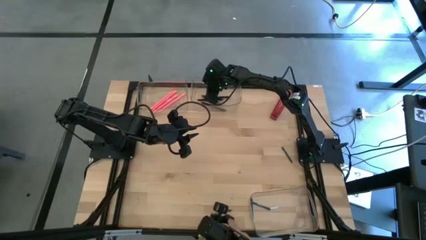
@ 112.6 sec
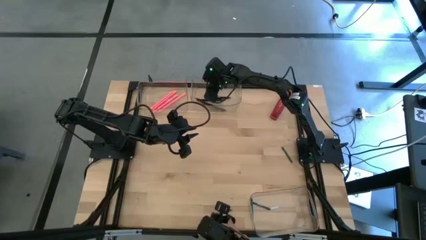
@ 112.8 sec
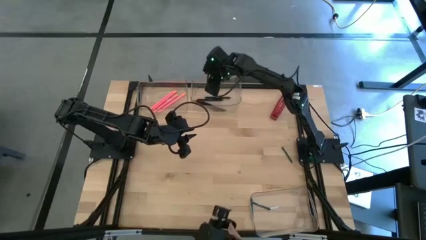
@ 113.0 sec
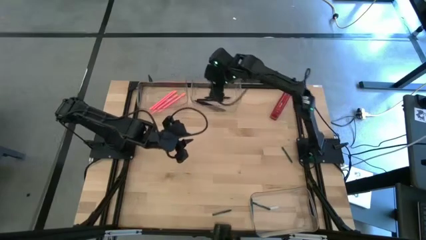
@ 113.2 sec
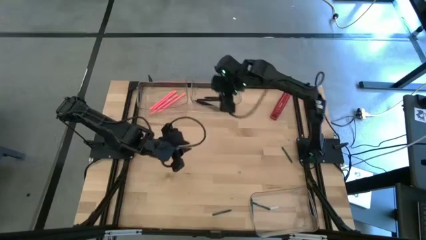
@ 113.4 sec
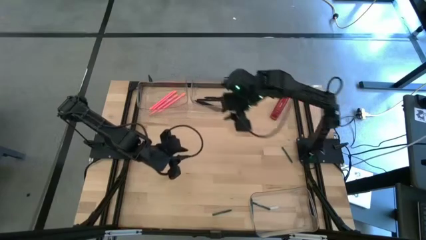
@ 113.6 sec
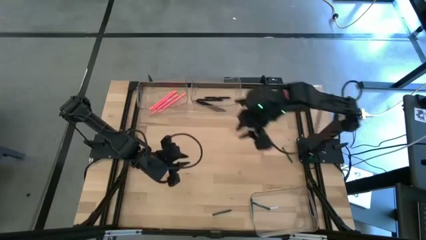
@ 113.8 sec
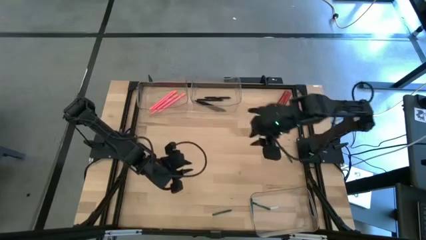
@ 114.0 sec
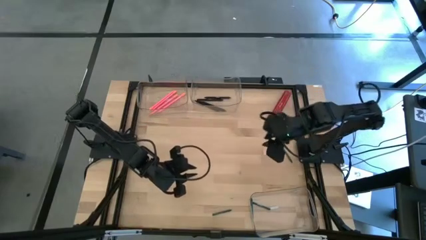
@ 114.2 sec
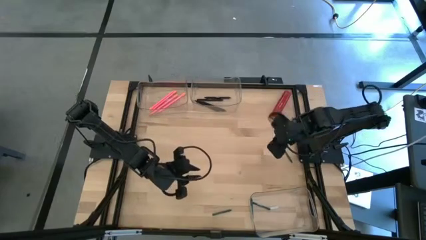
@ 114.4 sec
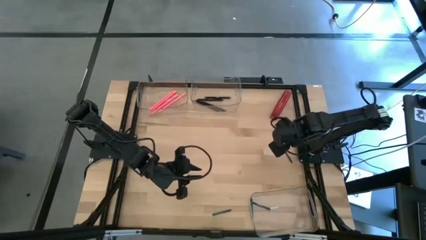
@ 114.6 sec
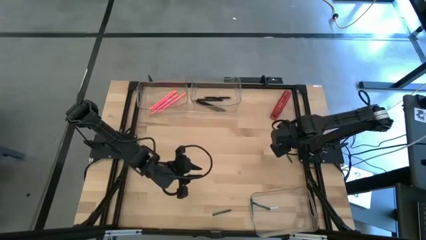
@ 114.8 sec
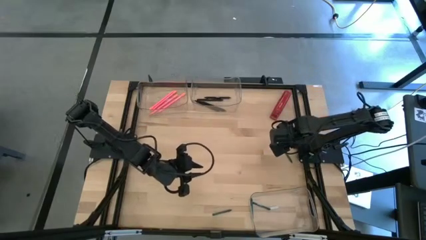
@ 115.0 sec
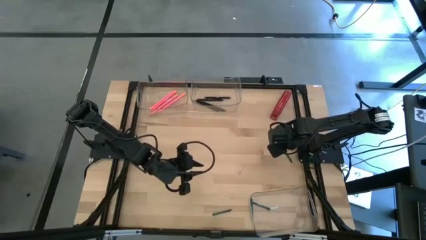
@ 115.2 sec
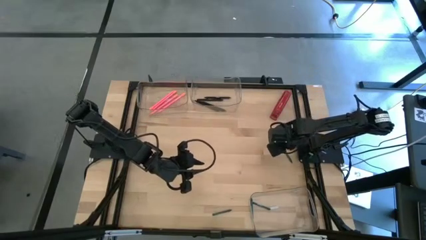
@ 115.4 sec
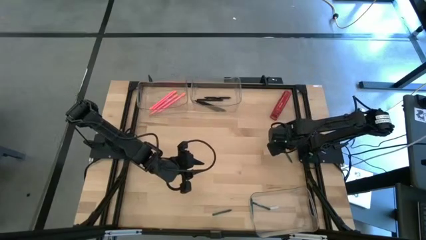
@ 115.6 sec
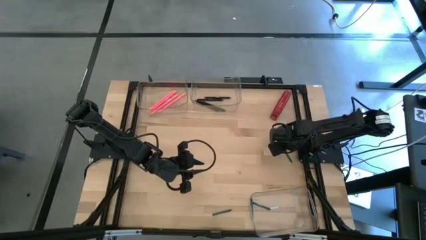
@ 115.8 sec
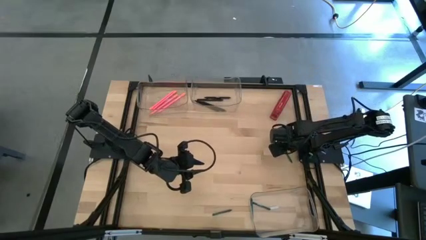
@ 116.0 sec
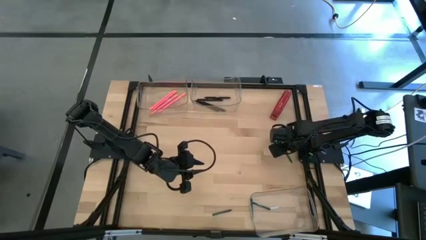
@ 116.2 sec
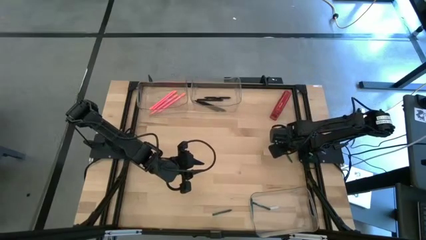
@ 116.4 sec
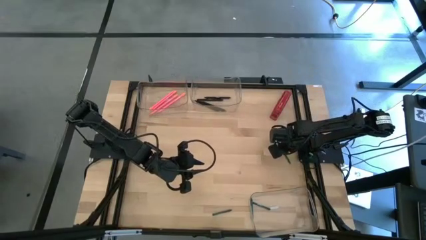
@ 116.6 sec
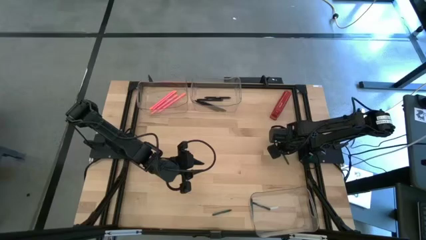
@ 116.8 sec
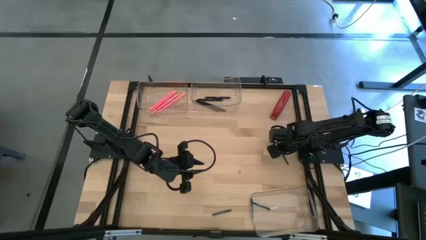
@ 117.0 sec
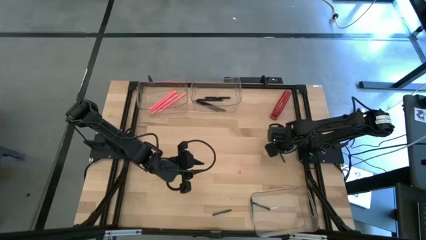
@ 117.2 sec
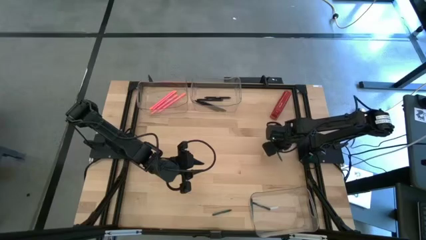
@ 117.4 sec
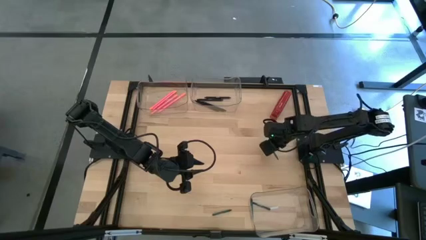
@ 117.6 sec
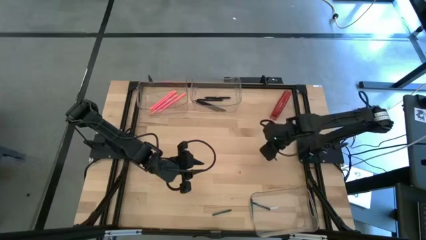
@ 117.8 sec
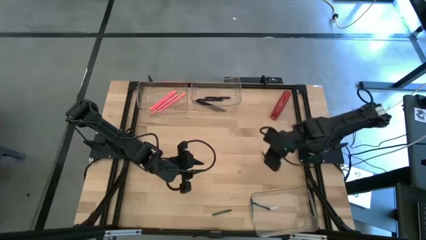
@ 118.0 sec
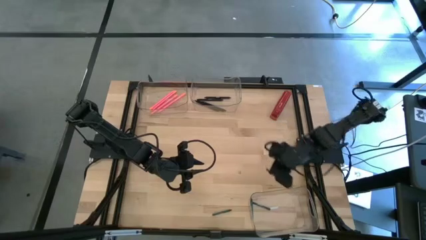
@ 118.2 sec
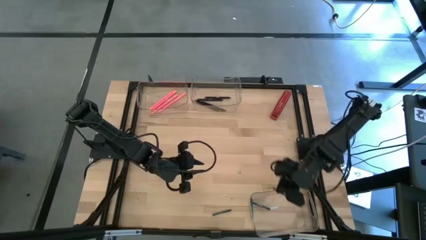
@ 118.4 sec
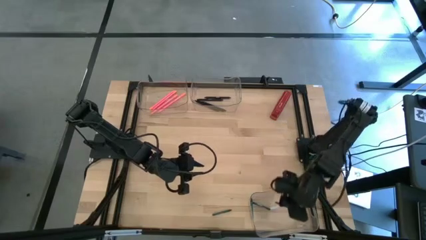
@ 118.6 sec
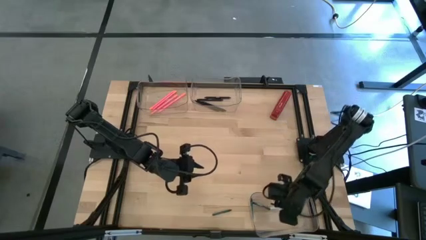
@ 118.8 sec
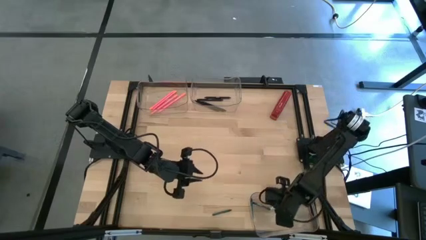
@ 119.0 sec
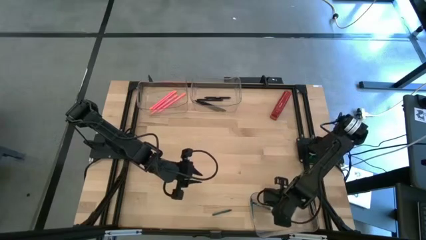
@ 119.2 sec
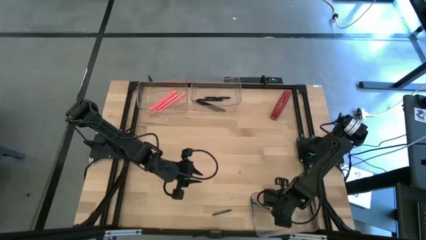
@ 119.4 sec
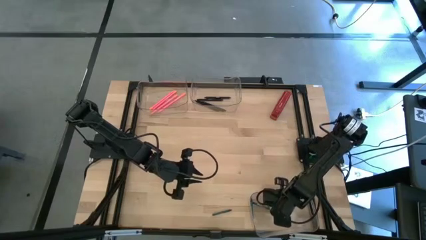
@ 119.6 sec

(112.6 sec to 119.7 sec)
Task: Sort crayons/erasers/pens/pencils in bins
Put the green crayon into the bottom transparent bin

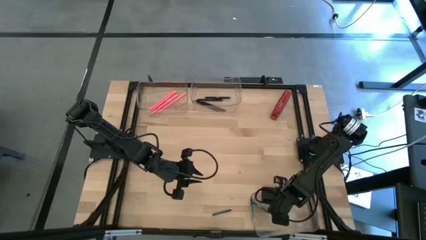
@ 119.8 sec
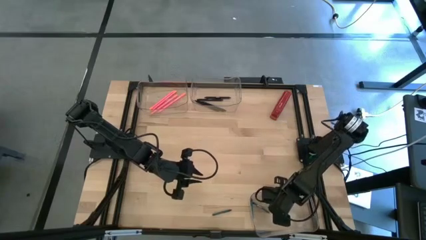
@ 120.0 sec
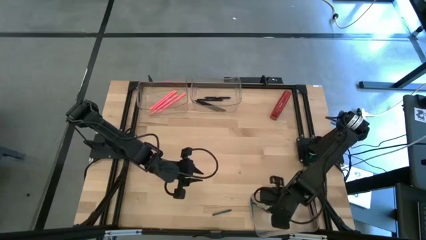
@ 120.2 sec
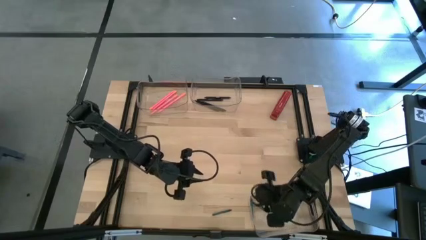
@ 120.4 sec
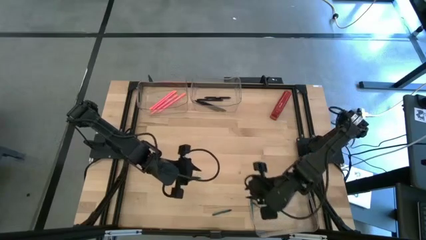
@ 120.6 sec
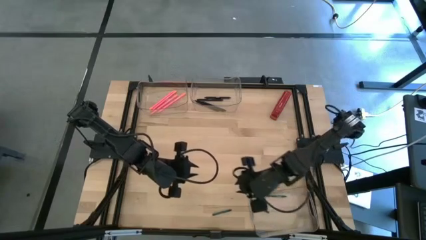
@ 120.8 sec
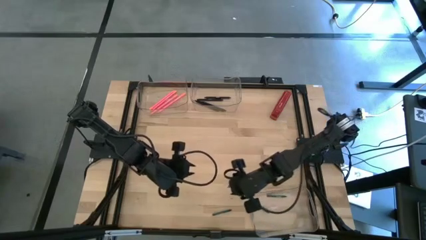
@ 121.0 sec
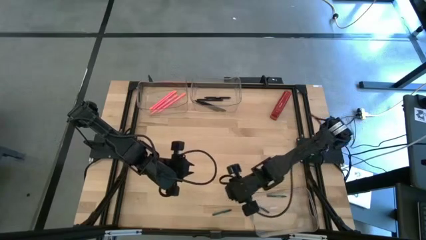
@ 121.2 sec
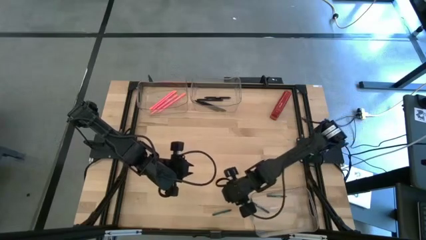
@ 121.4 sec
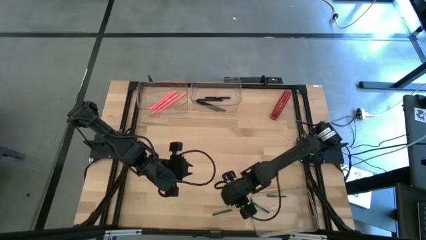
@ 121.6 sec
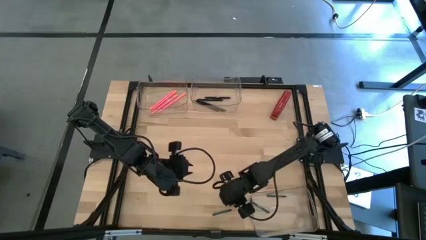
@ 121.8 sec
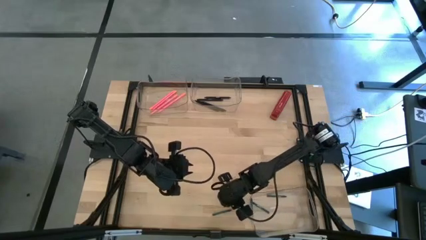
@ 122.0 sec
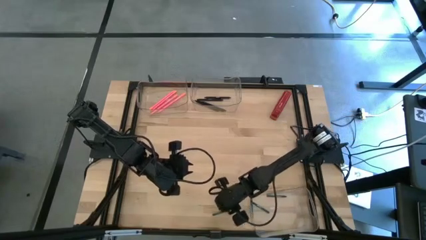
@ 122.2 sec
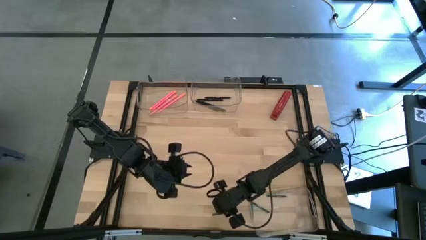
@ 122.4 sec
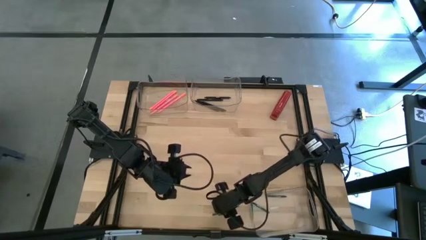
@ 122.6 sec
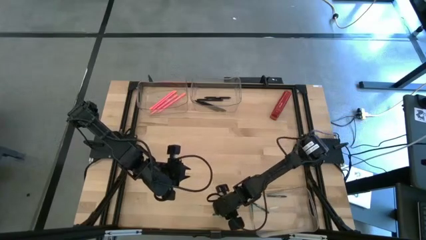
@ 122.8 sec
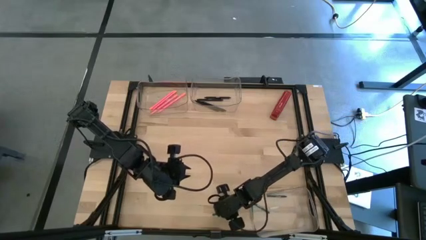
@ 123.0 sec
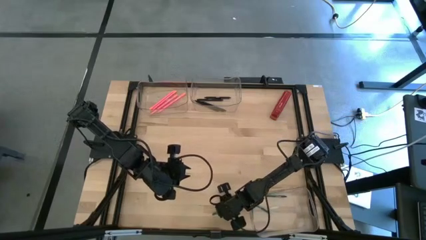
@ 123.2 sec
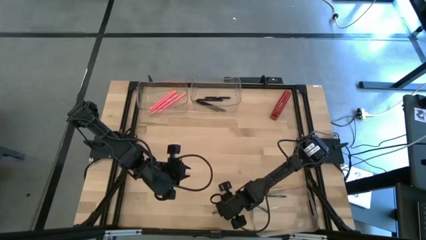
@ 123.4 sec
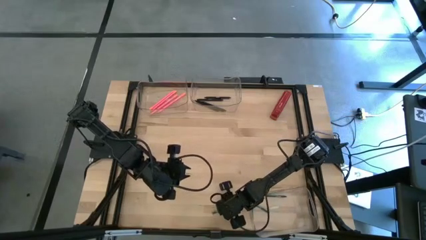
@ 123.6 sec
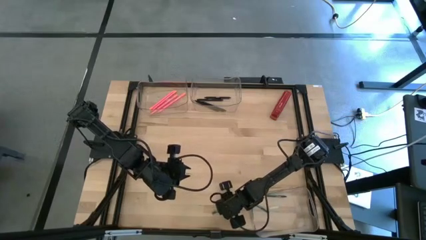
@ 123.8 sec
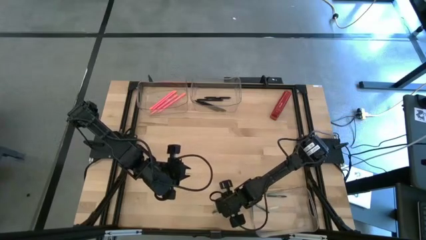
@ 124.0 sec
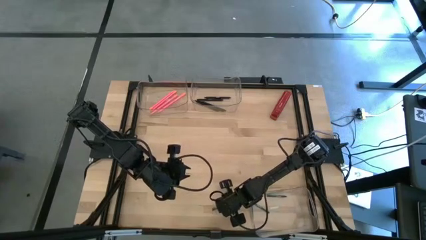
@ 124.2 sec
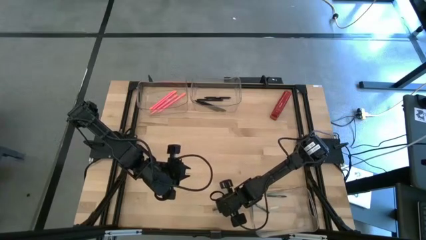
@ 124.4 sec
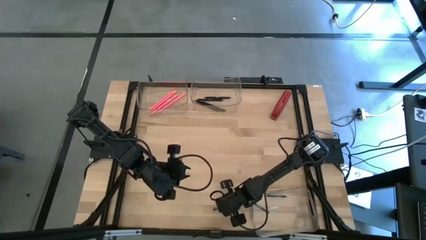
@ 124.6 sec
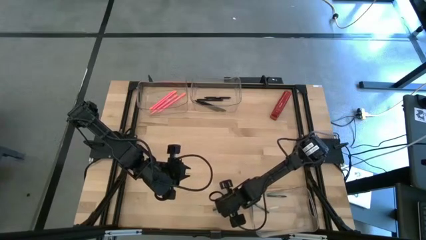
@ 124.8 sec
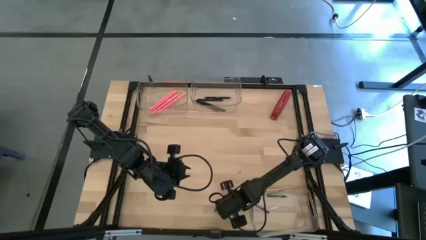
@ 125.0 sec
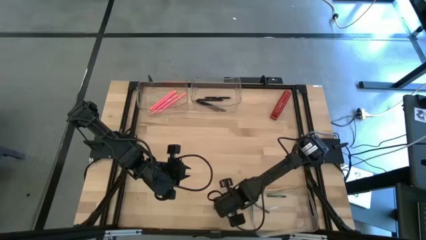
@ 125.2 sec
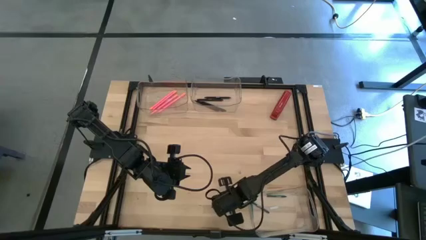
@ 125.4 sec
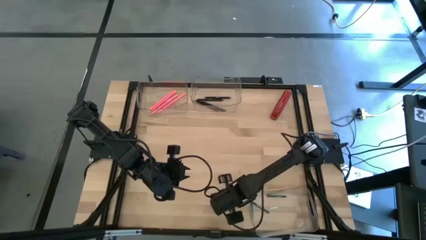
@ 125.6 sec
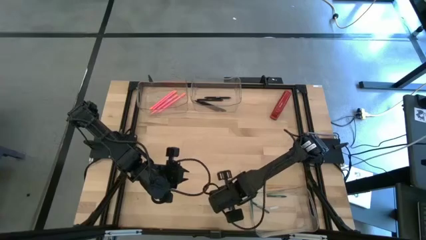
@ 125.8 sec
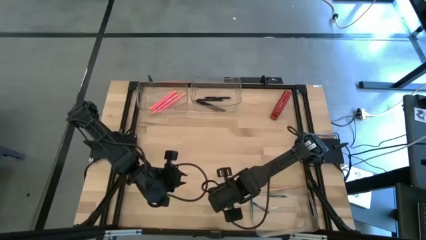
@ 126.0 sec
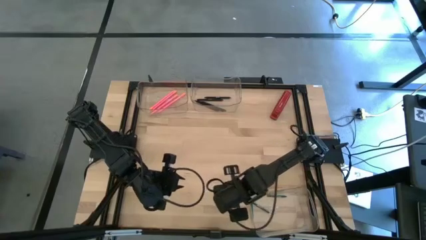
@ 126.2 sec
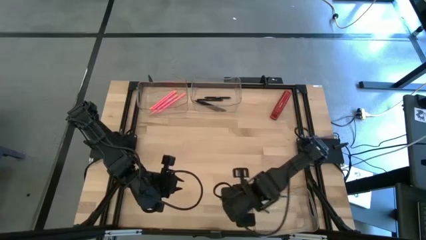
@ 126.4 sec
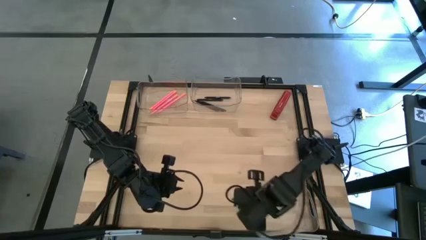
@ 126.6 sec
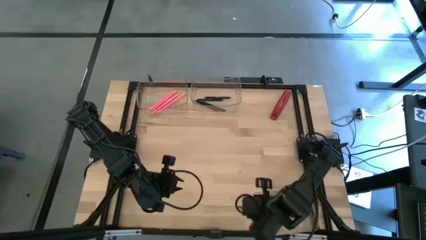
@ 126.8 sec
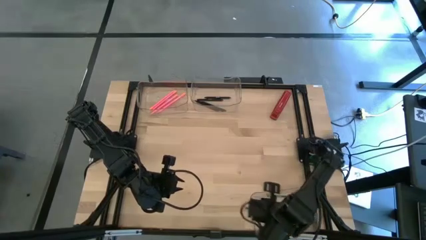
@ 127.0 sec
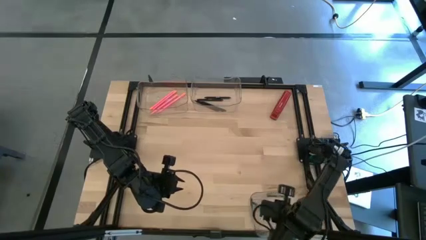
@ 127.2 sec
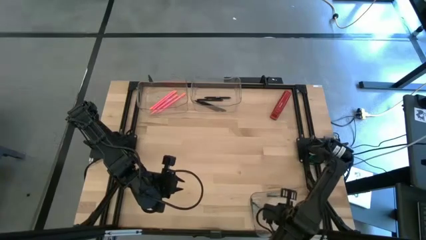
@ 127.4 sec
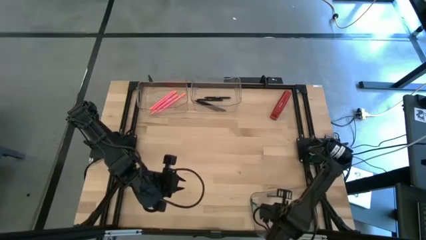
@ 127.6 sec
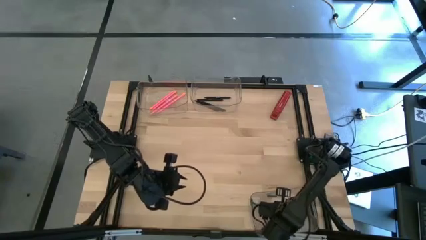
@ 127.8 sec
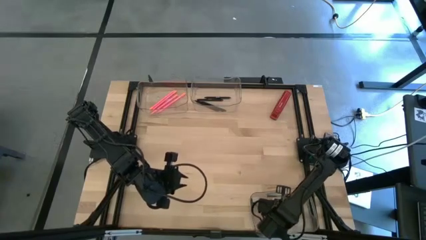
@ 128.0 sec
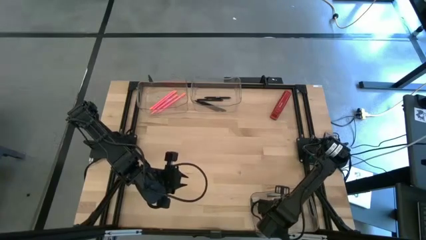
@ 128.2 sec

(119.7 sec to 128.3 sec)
Put the green crayon into the bottom transparent bin

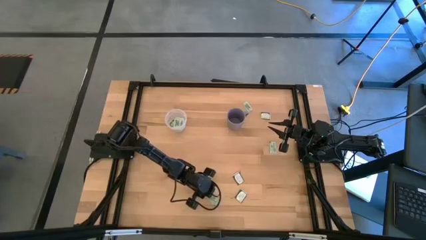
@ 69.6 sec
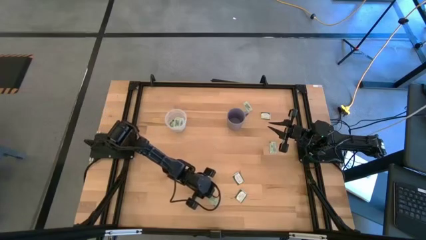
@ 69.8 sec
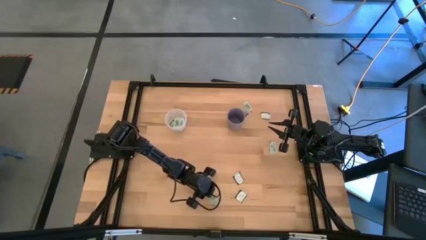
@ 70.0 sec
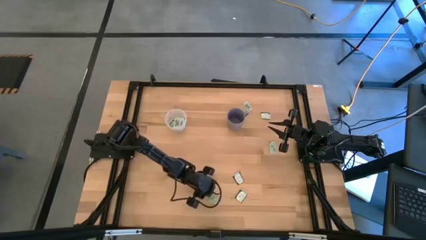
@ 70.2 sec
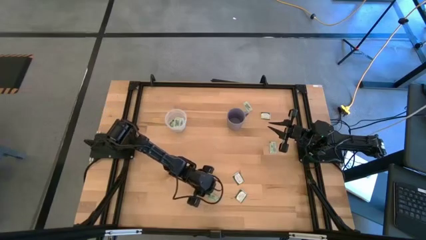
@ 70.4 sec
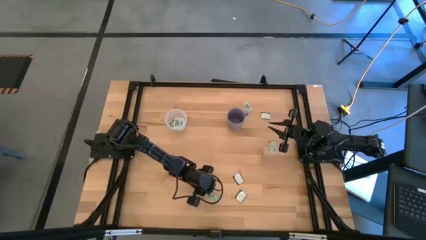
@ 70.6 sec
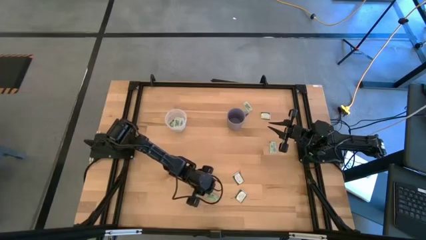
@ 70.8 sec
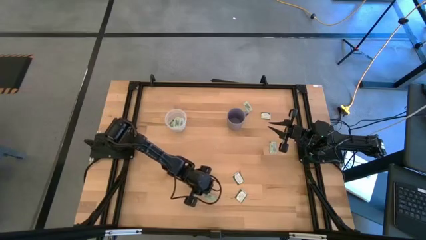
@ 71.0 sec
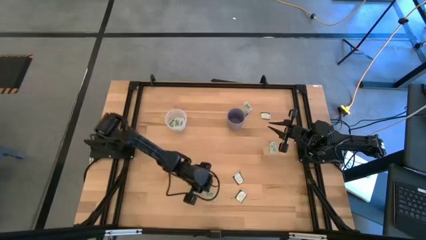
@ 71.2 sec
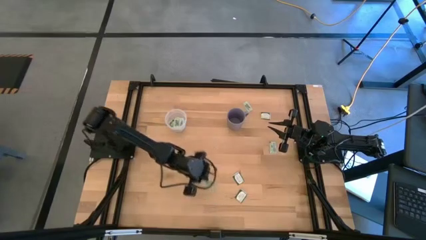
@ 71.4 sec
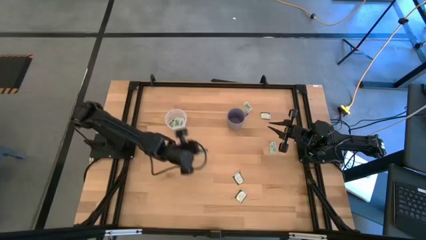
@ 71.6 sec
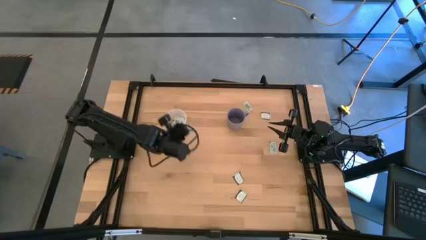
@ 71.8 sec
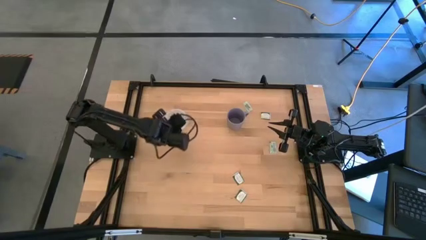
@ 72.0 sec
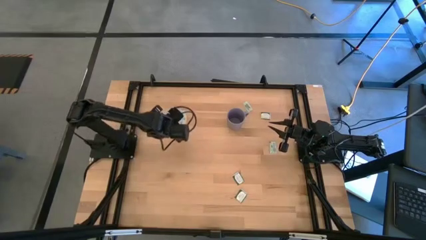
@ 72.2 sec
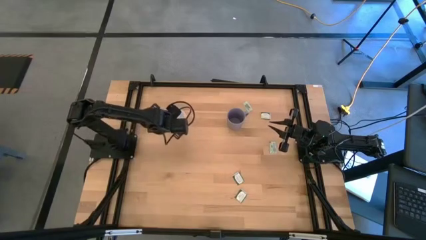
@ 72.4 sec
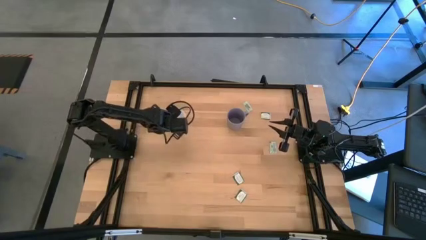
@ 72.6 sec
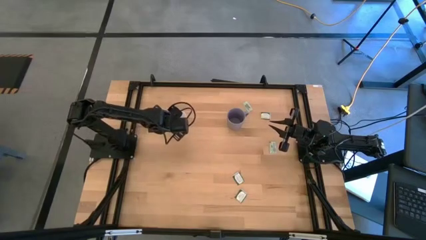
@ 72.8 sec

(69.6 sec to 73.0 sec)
Task: Pick and place Stevia / Truvia into bins
Put the light green stevia packet into the transparent container
